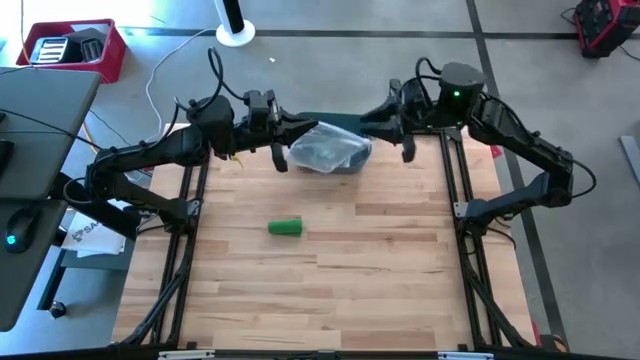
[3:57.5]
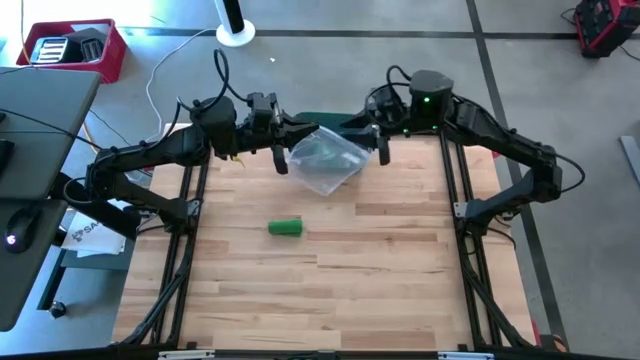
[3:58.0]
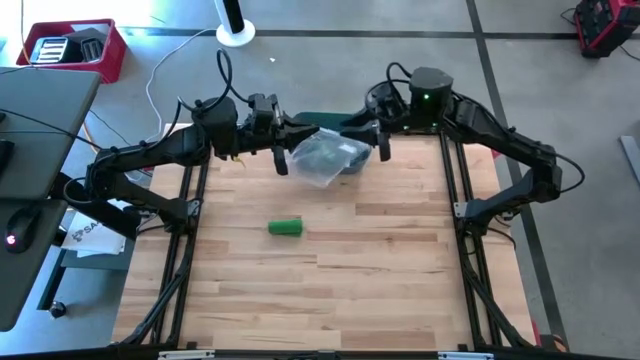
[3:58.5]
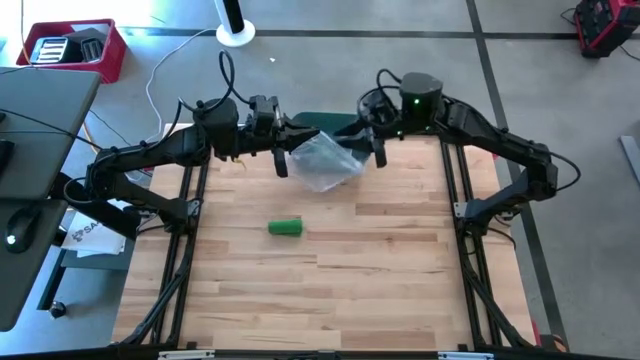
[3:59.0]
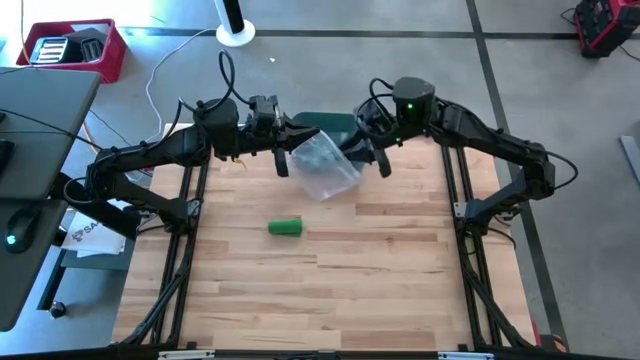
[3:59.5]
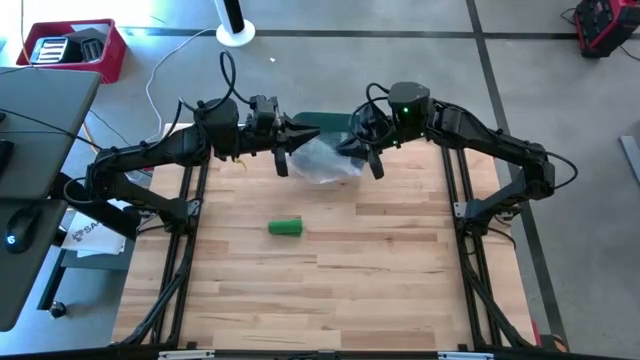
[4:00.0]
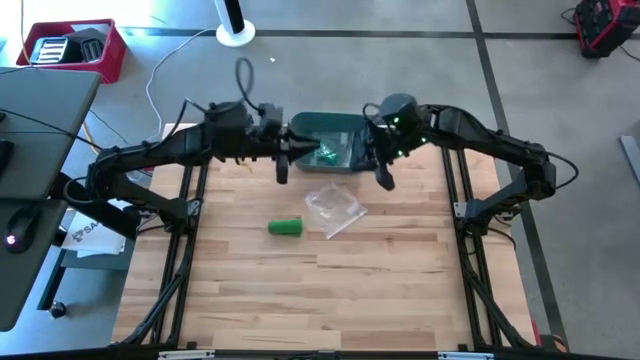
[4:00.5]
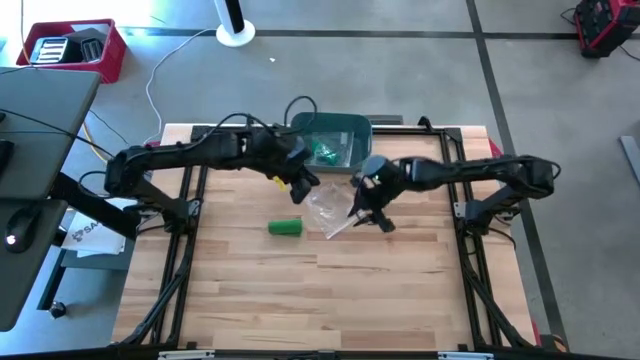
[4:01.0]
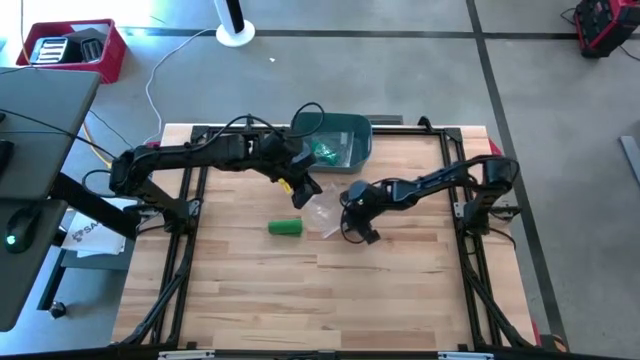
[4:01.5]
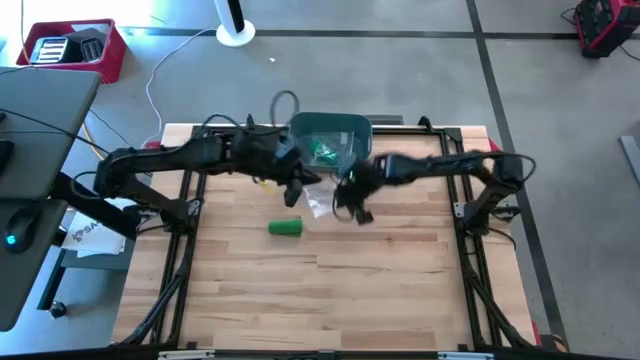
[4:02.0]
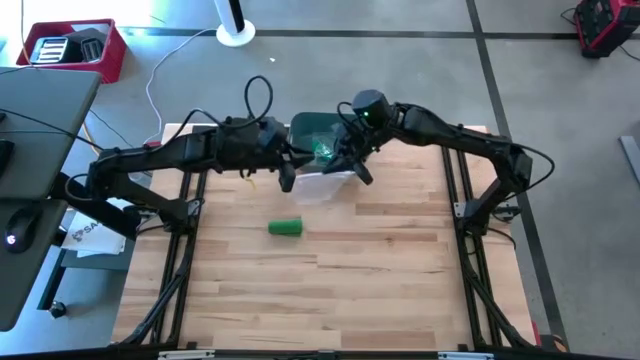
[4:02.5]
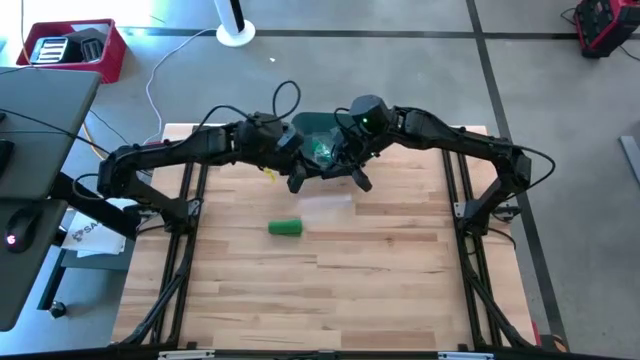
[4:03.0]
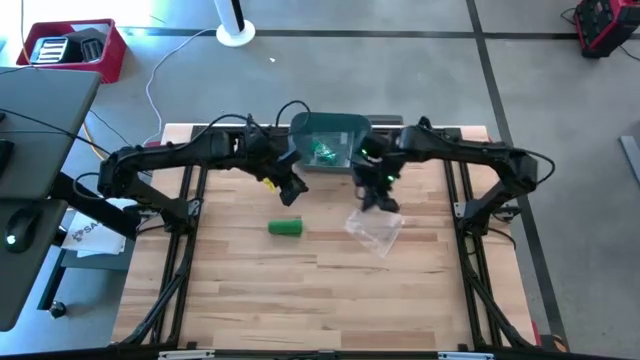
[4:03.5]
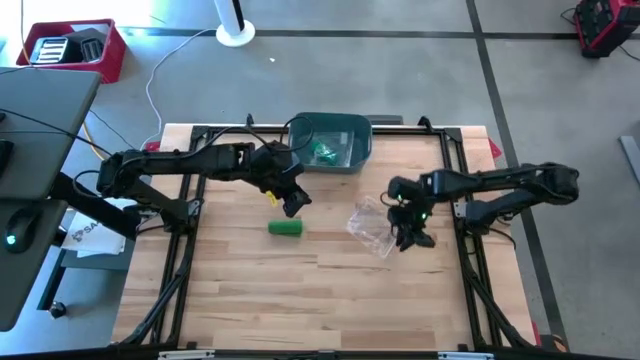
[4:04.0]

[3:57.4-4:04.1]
Task: Roll bandage
Open the transparent zip bag

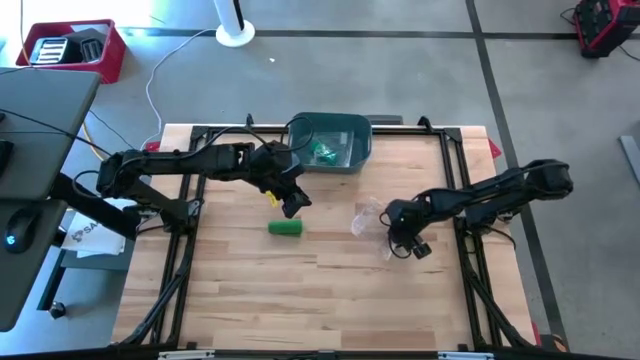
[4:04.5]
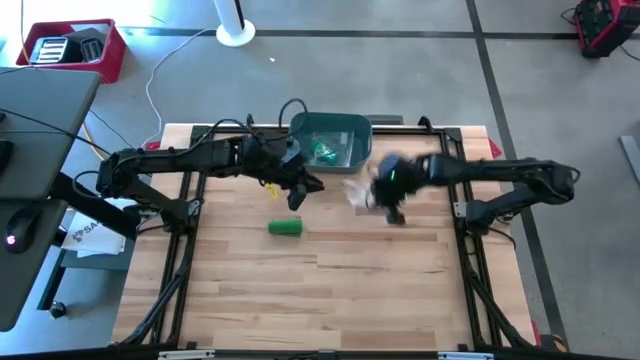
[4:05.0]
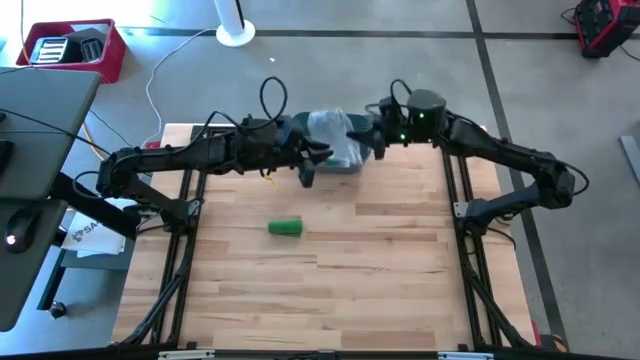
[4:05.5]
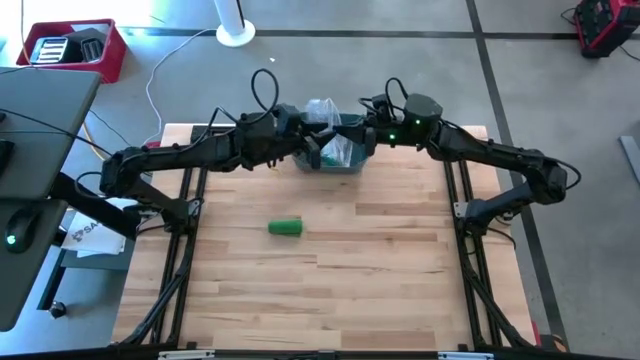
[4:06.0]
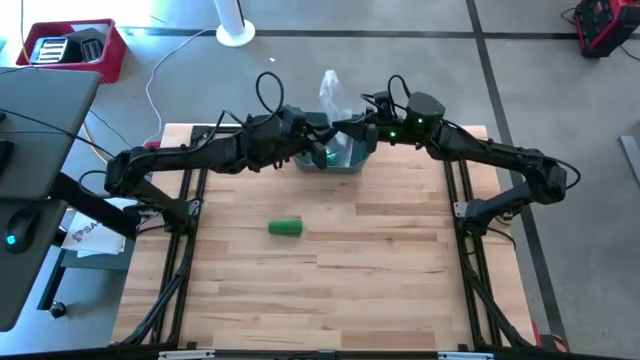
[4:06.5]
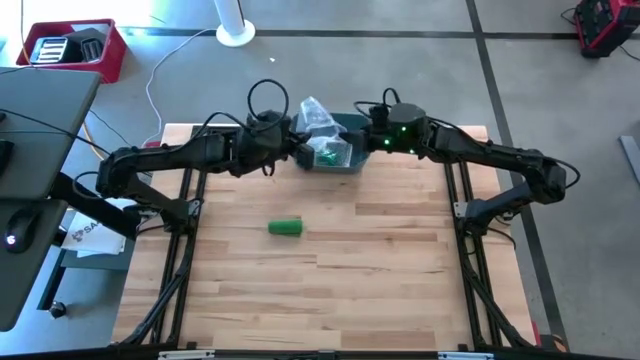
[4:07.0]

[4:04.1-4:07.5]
Open the transparent zip bag

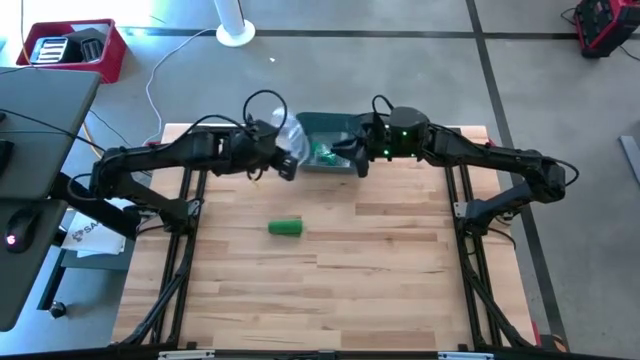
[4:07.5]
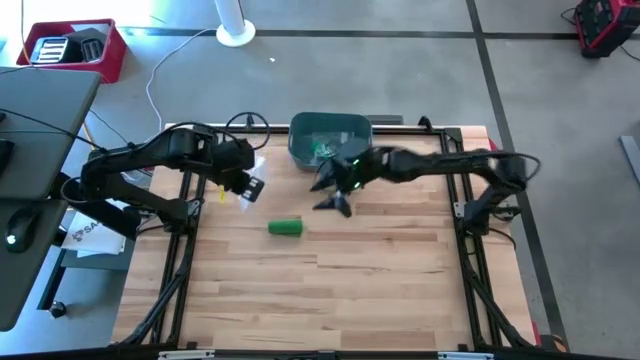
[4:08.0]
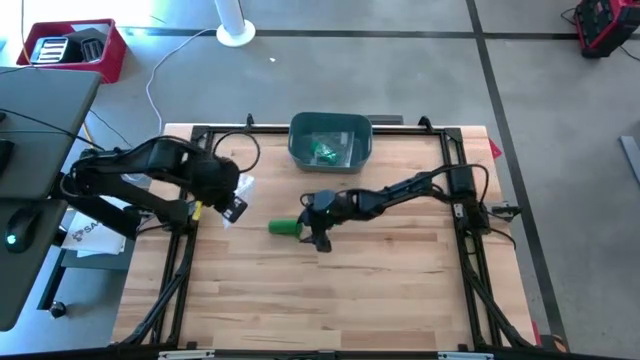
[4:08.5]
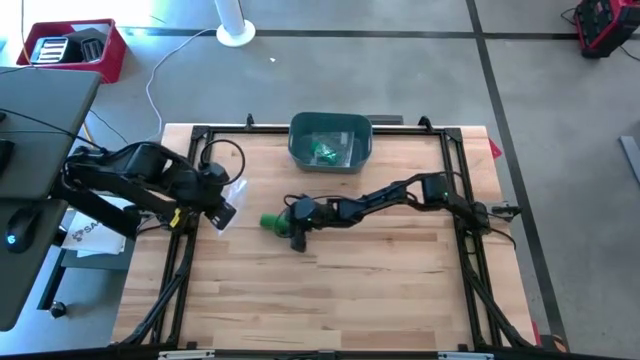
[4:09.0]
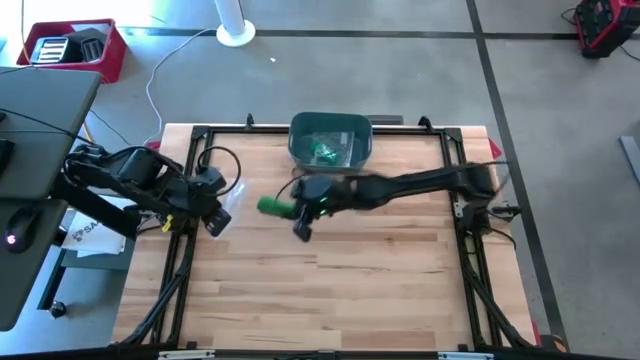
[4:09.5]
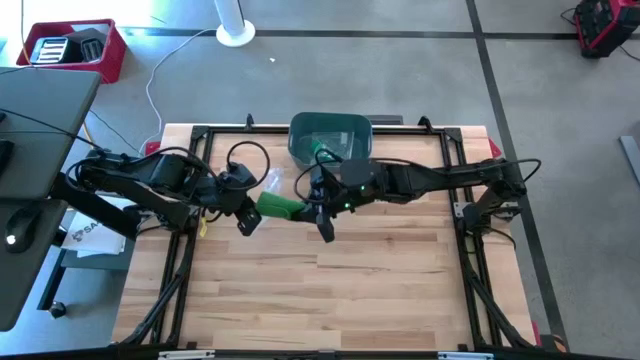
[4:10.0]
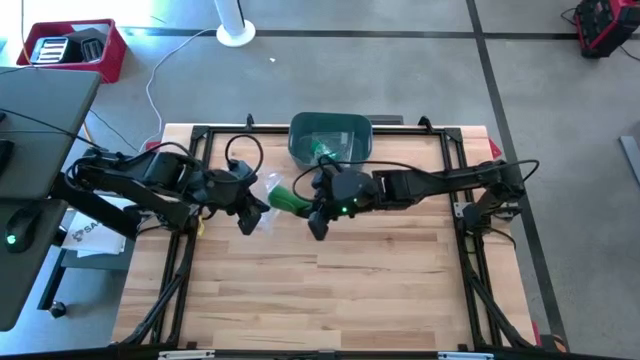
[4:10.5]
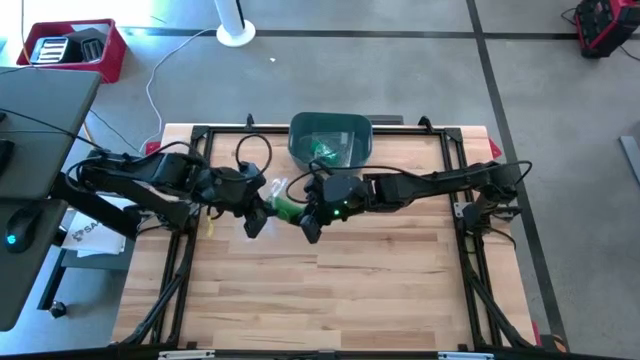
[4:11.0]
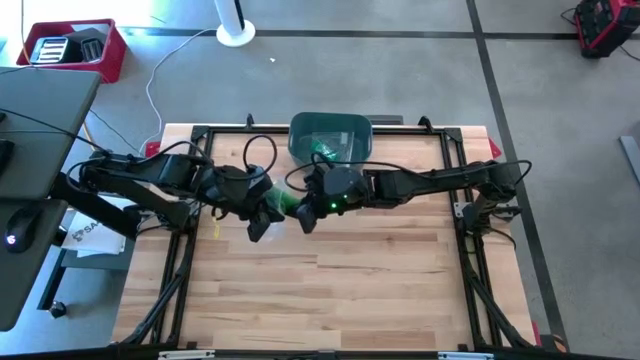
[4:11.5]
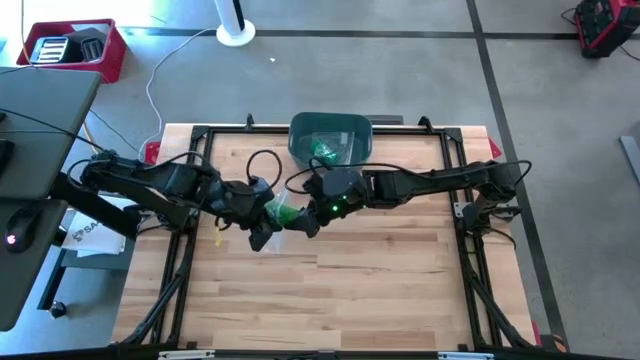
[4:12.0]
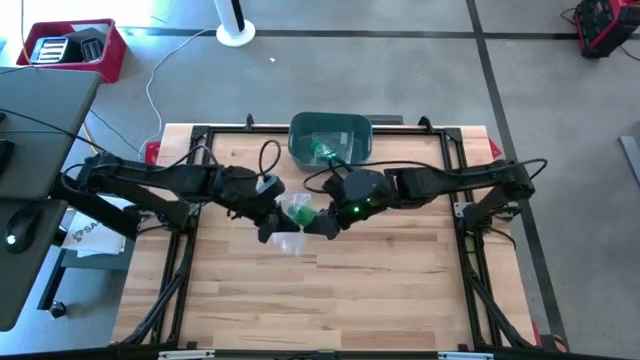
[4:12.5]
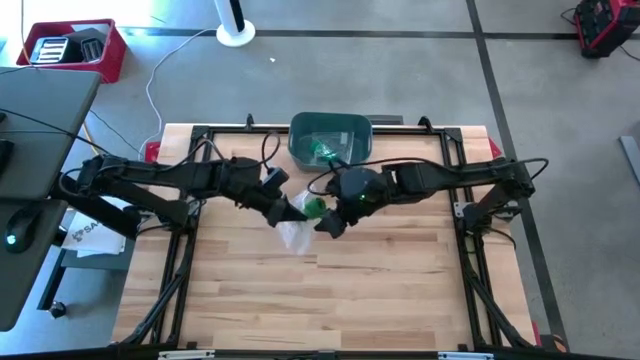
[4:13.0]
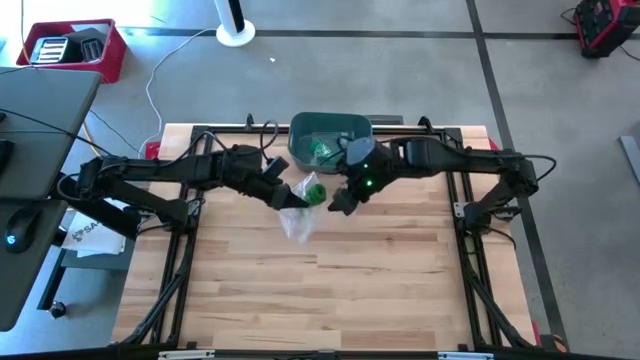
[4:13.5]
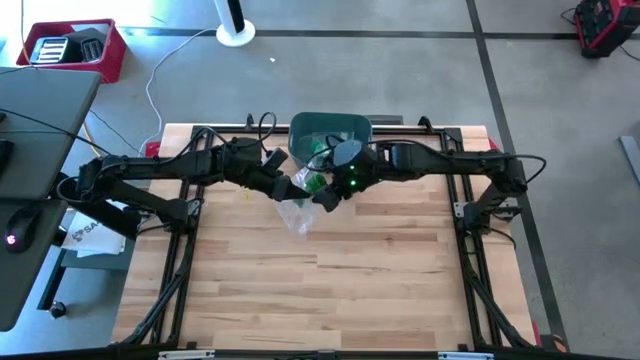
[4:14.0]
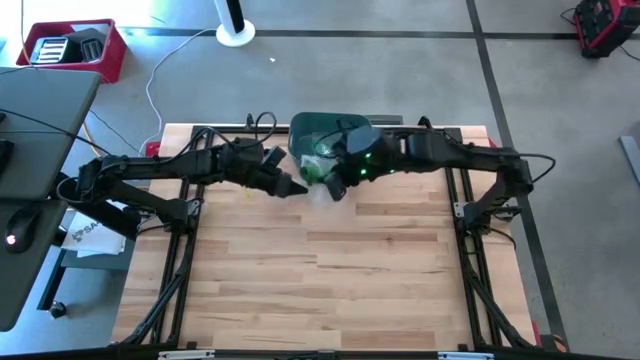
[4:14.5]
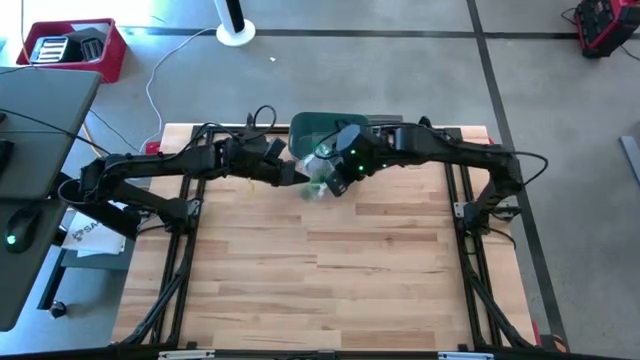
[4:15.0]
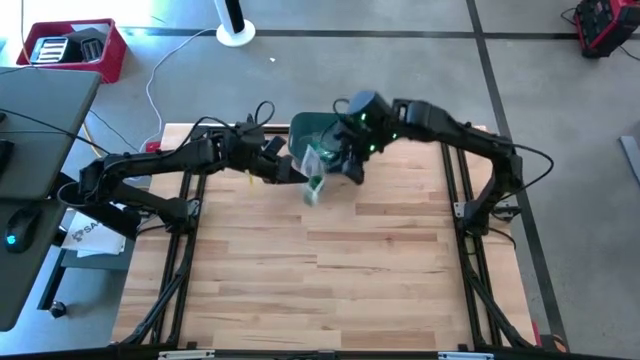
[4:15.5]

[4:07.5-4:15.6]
Put the rolled green bandage into the transparent zip bag

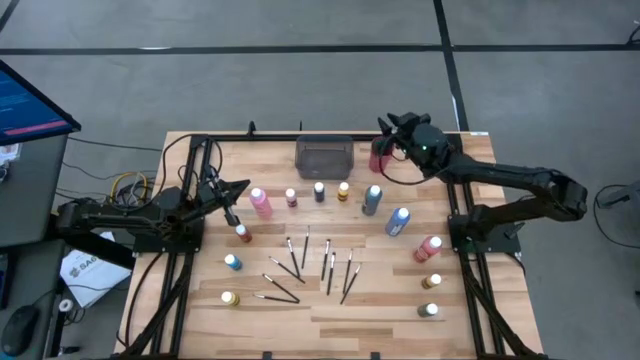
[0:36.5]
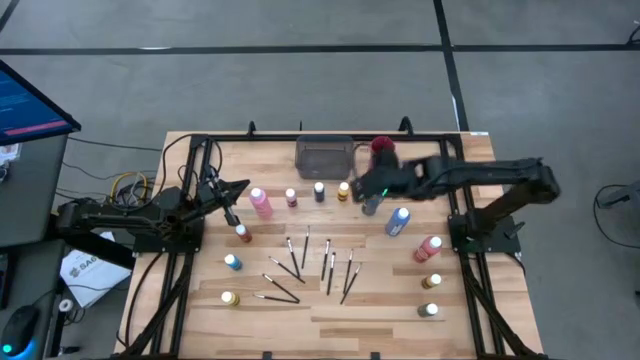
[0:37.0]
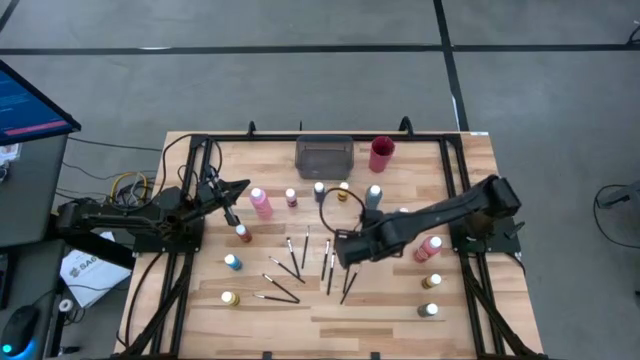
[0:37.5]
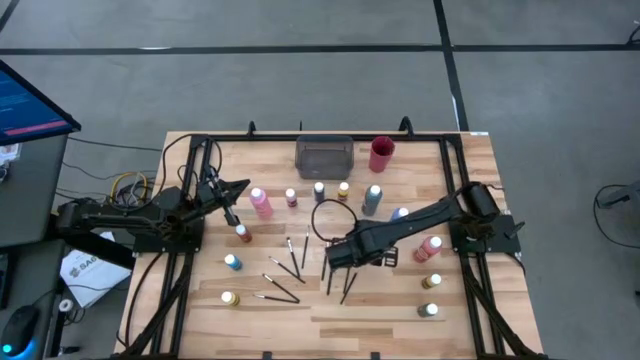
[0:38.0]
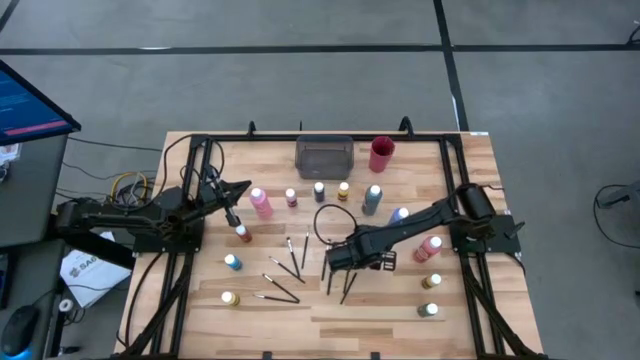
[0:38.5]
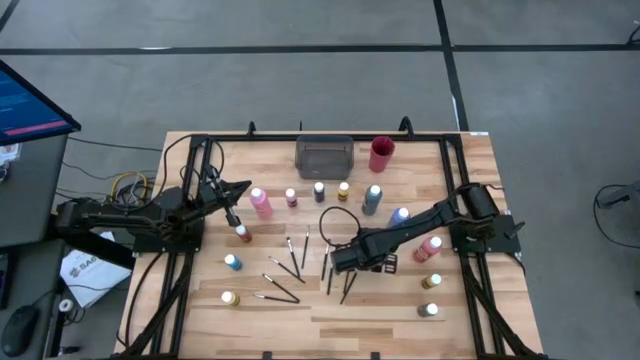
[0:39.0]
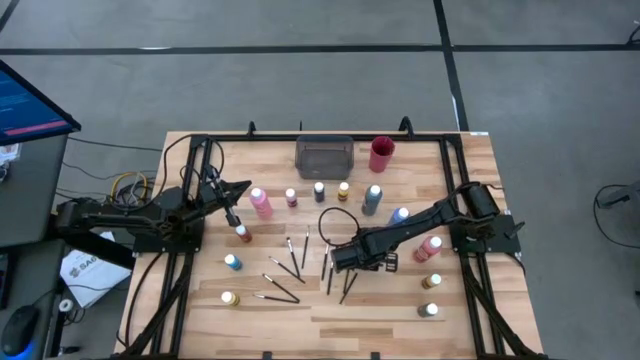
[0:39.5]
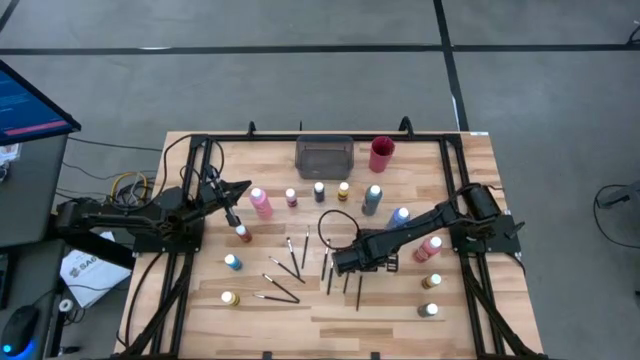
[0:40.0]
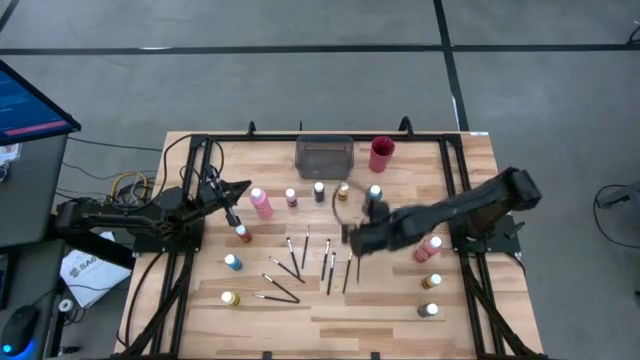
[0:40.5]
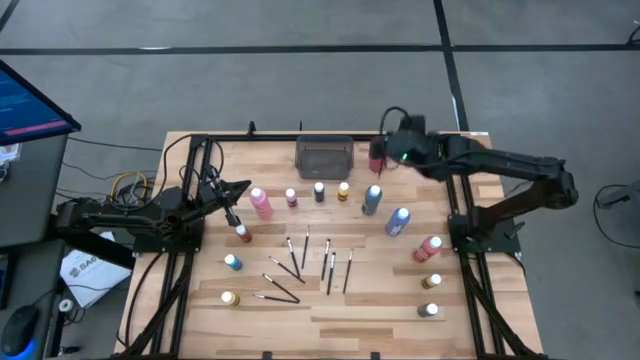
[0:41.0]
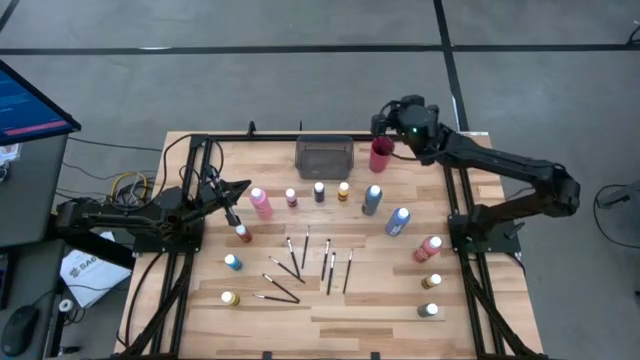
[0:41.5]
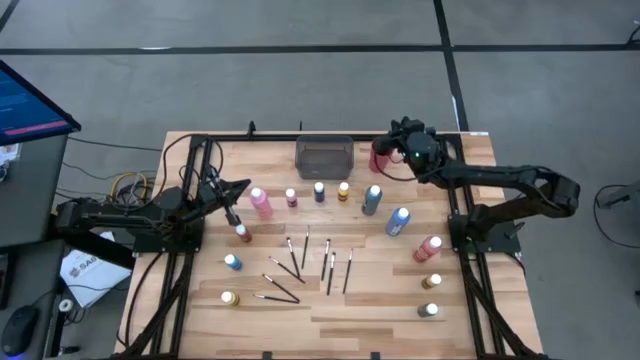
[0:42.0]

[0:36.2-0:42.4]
Task: Pick & Place Paint Supplies
Put the black paintbrush into the red cup
